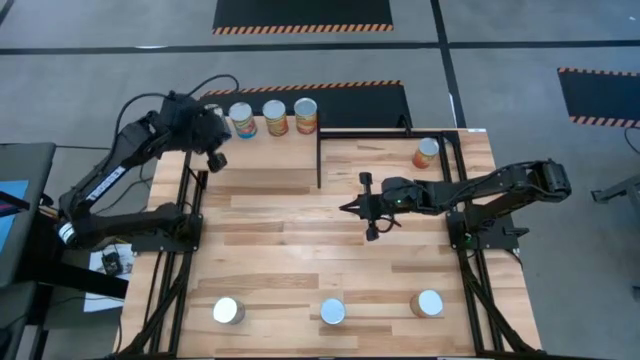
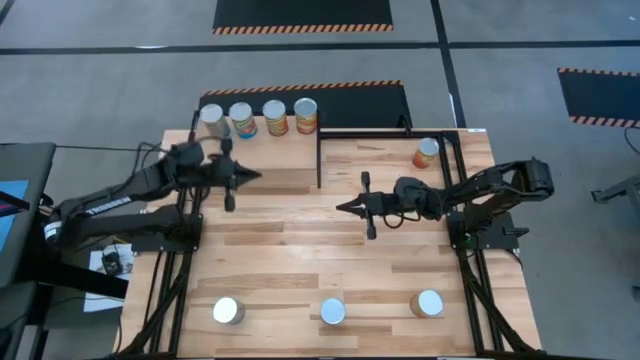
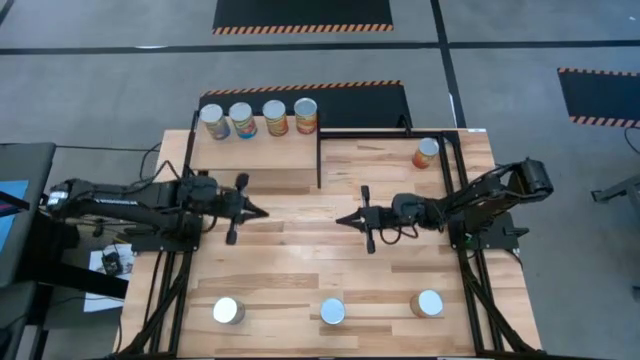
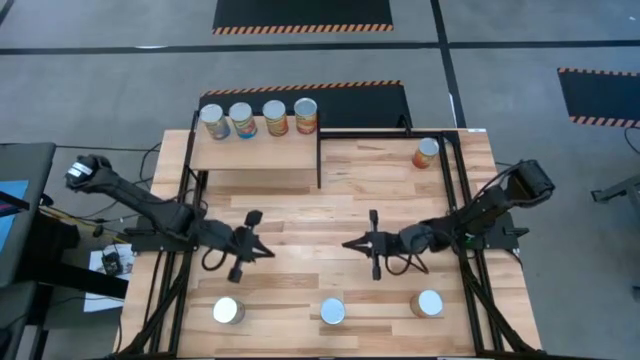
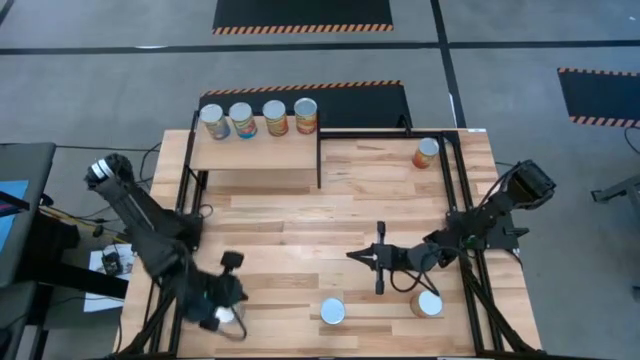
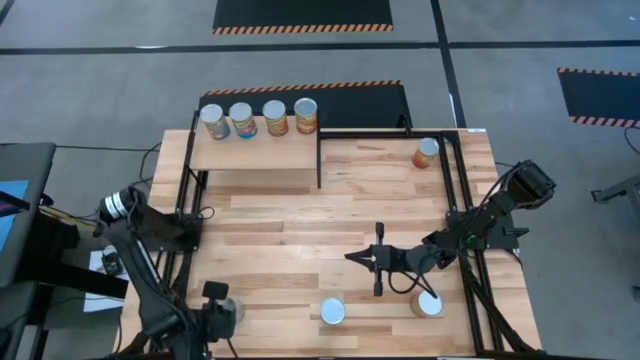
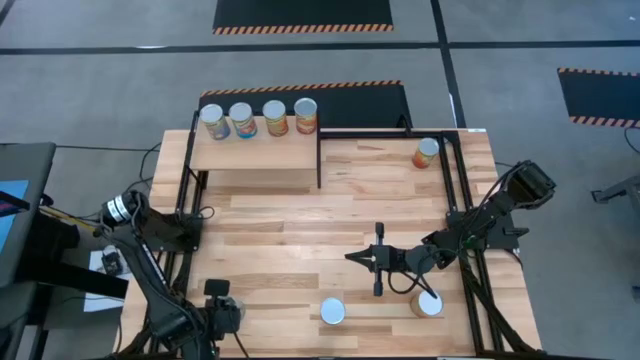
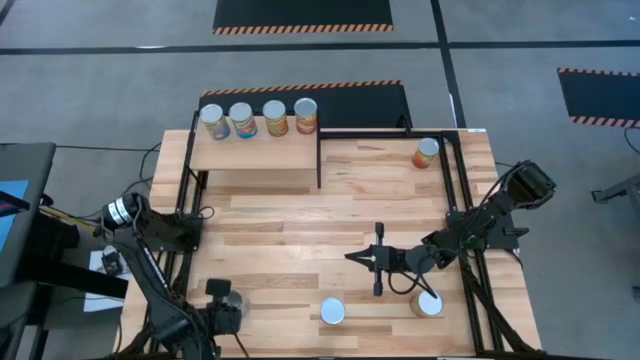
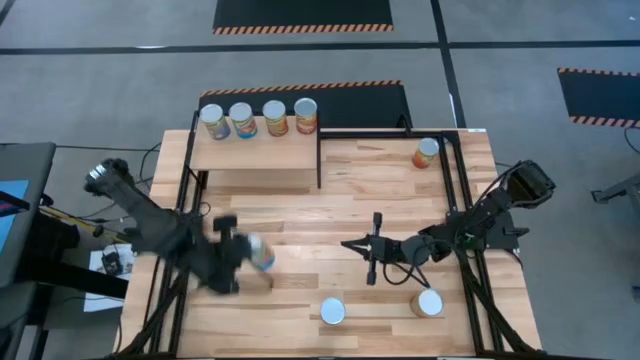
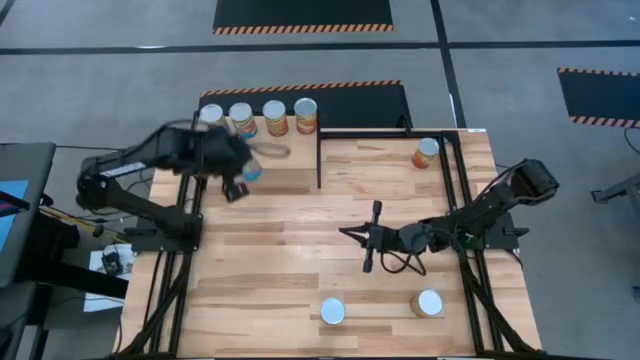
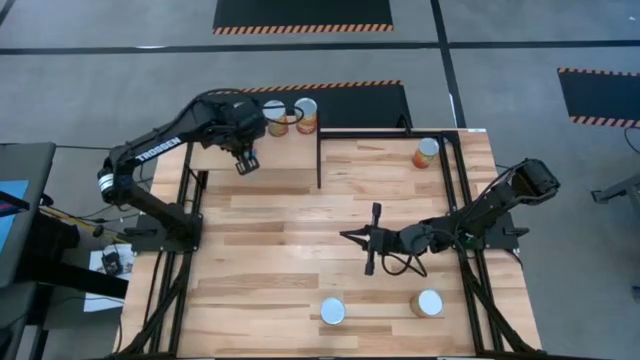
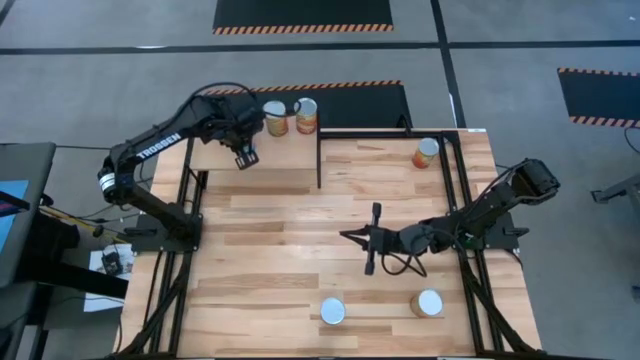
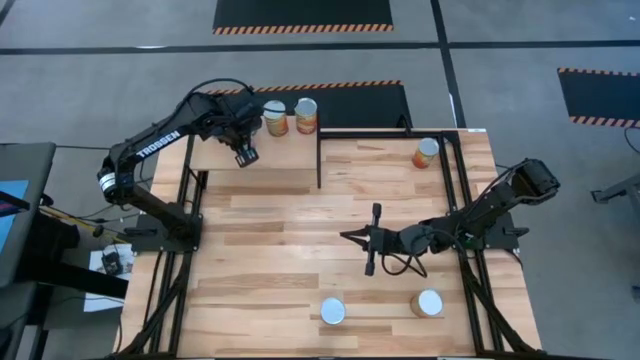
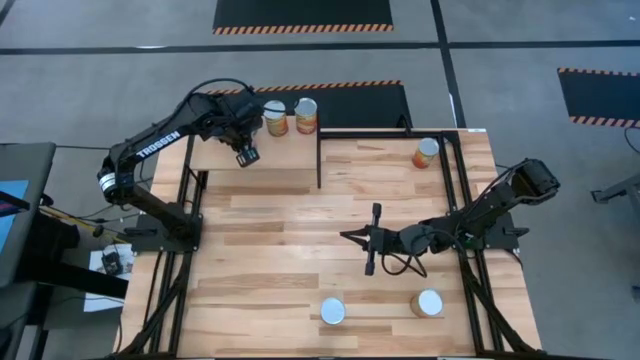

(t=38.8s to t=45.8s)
Task: Pick and place cans onto a shelf
Put the canned tomatoes on the shelf aligned with the other canned tomatoes

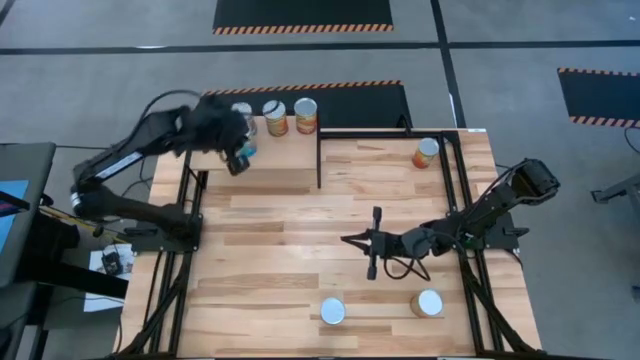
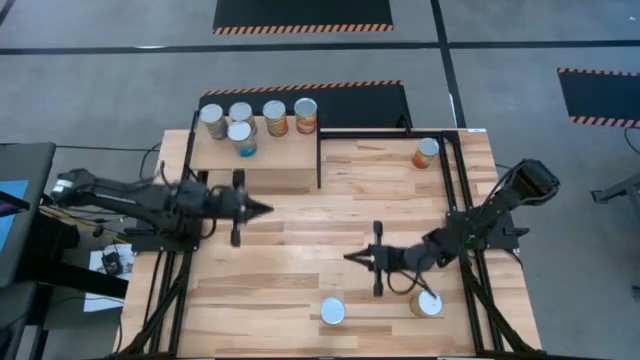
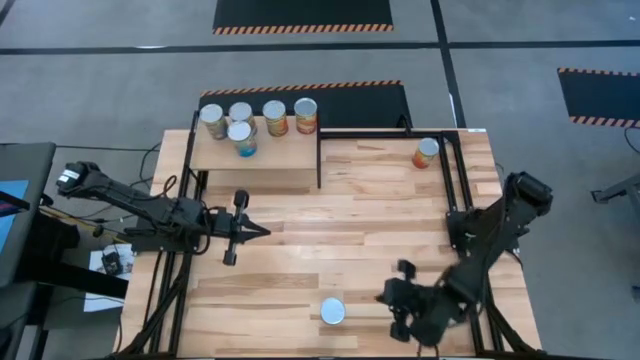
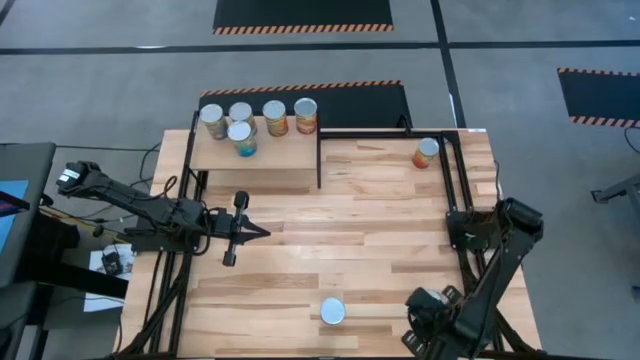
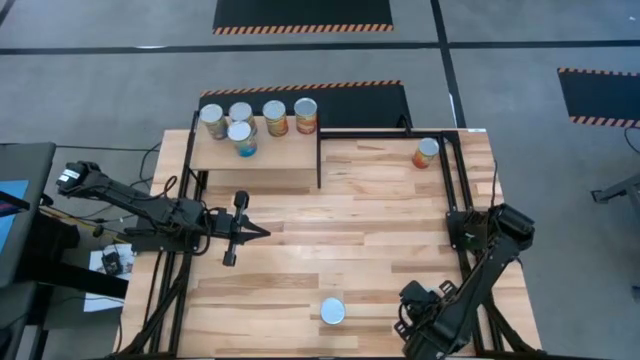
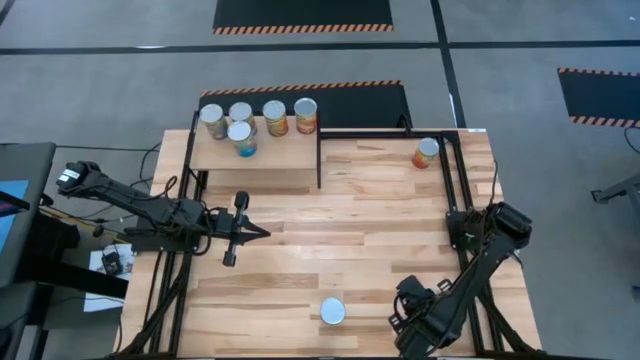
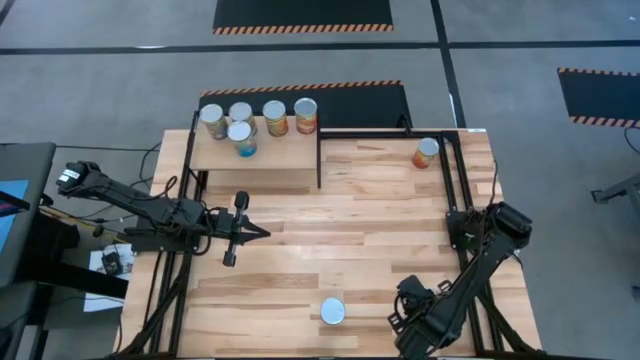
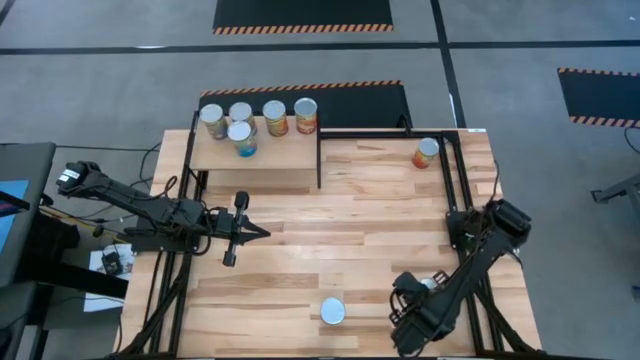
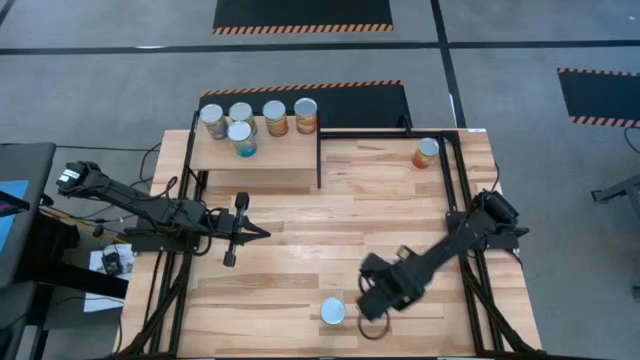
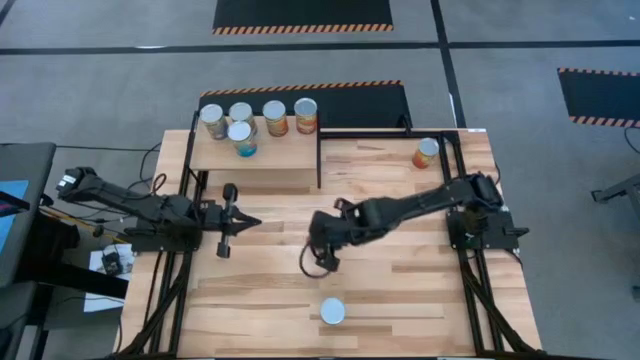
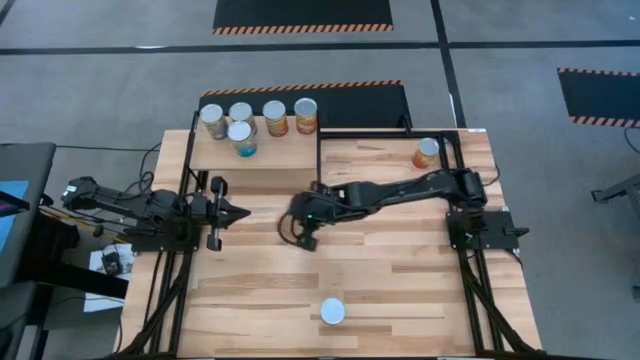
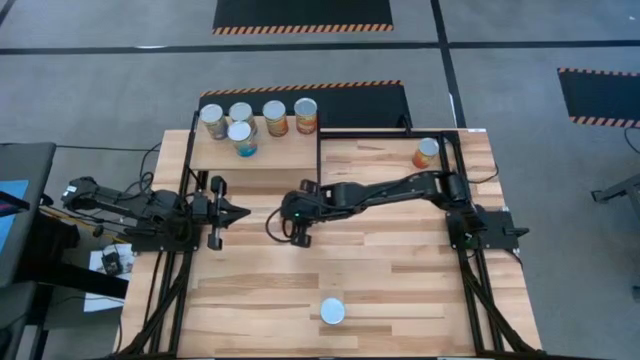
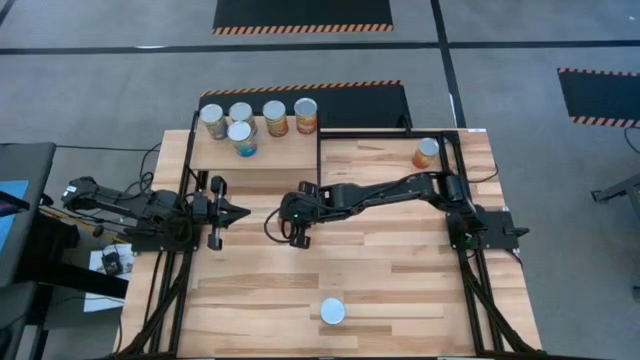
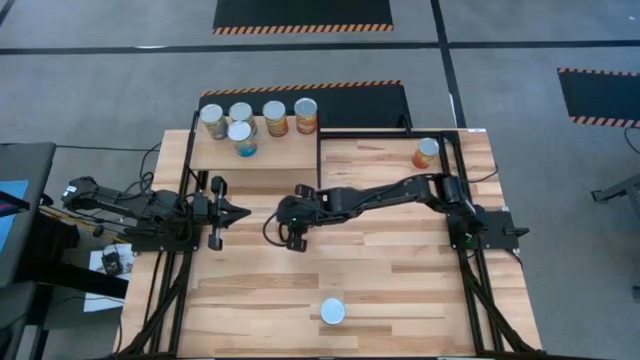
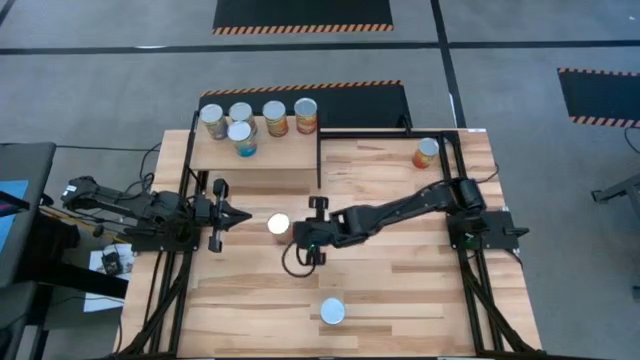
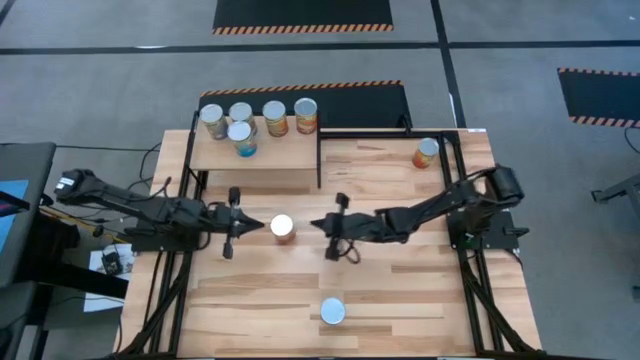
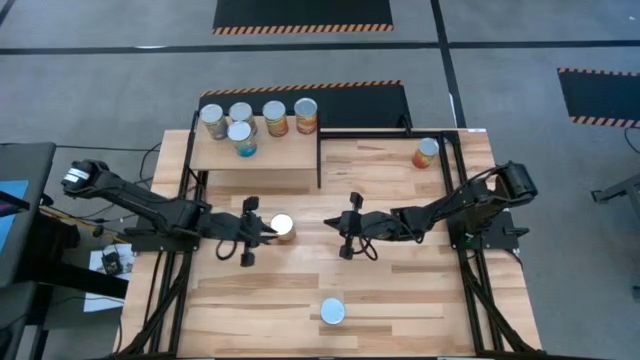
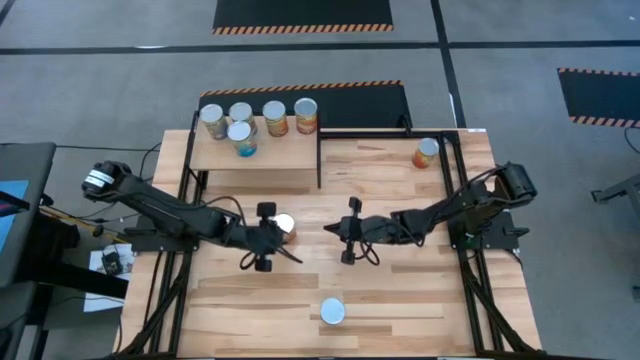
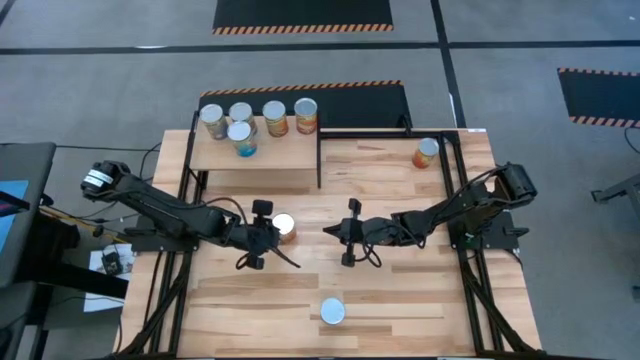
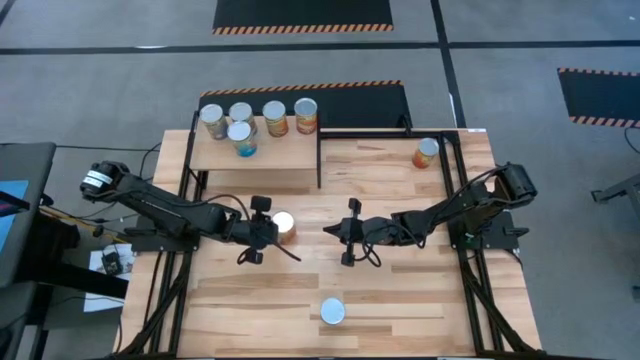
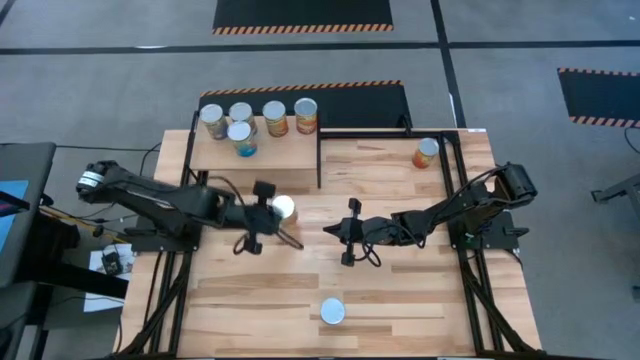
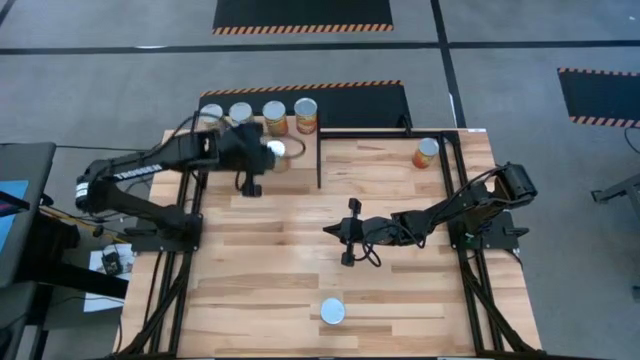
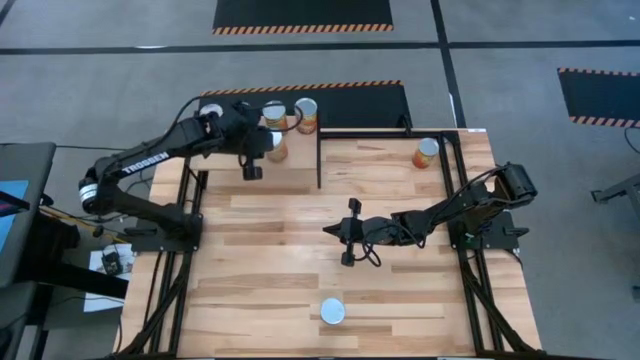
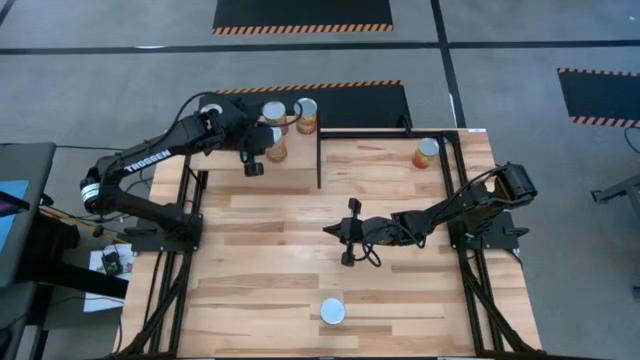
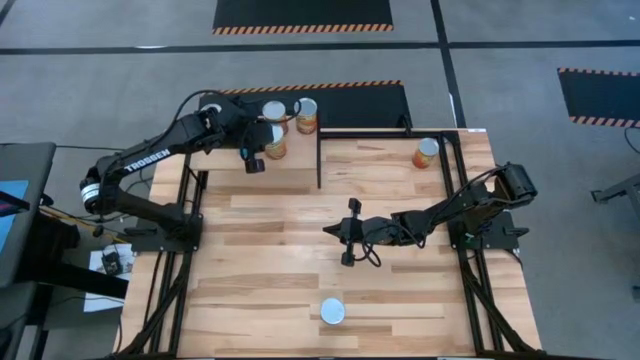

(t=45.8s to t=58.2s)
Put the canned green beans on the shelf aligned with the other canned green beans
